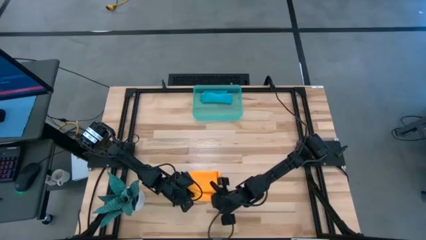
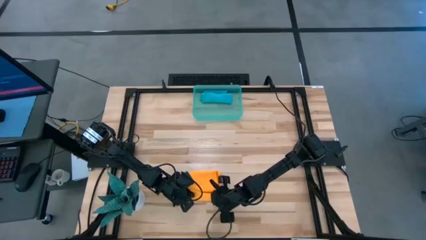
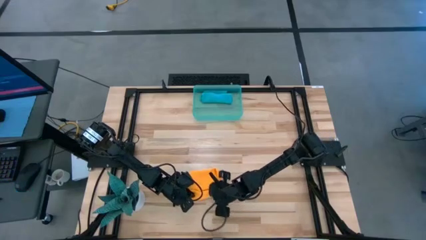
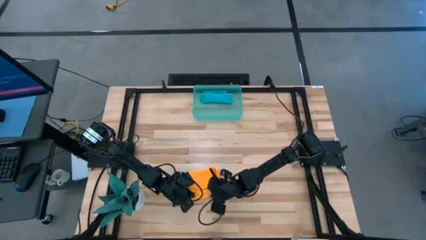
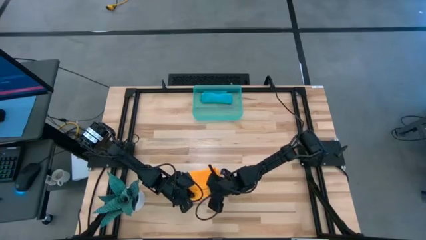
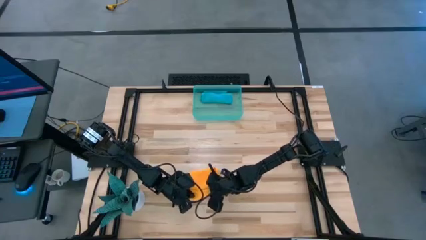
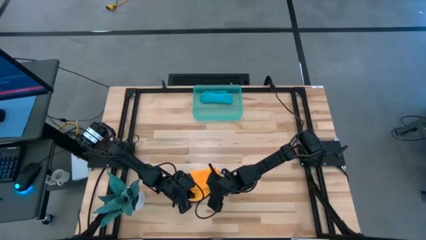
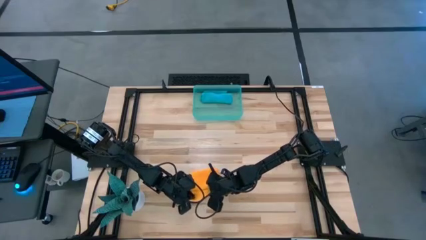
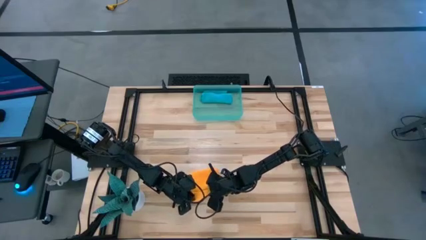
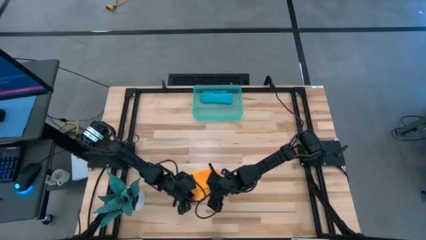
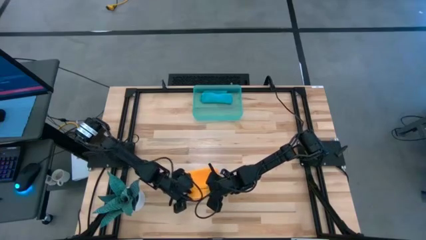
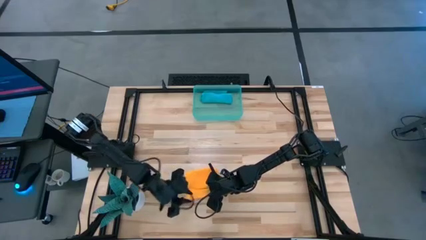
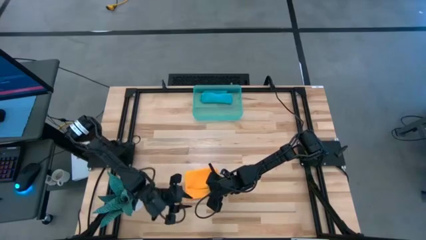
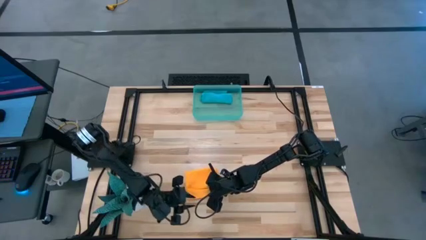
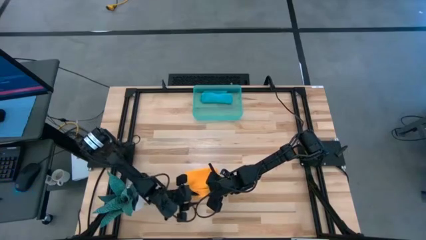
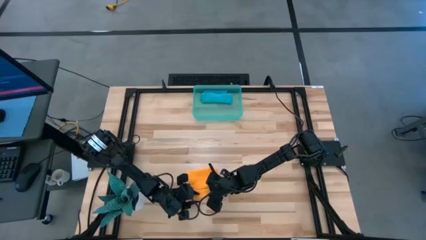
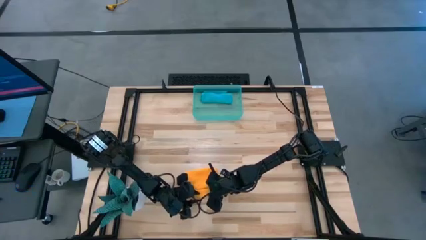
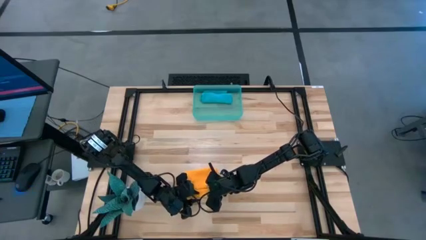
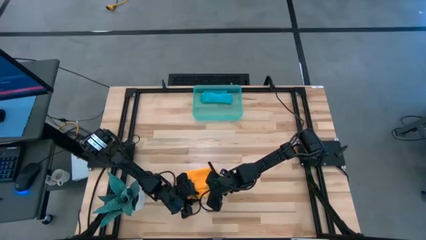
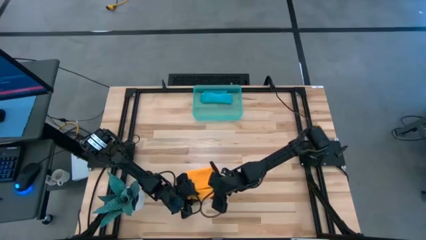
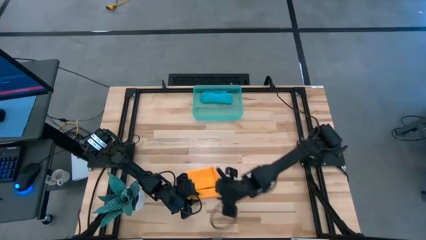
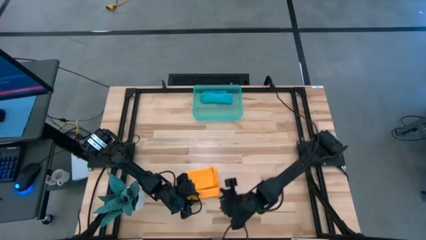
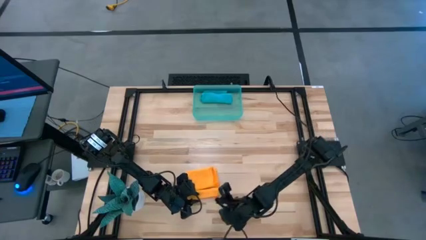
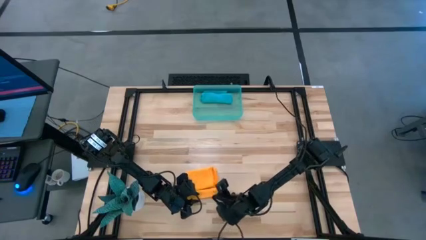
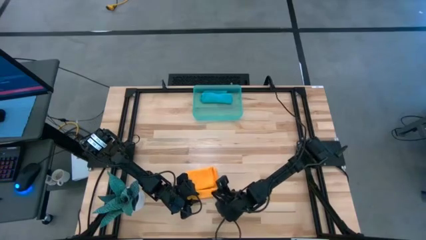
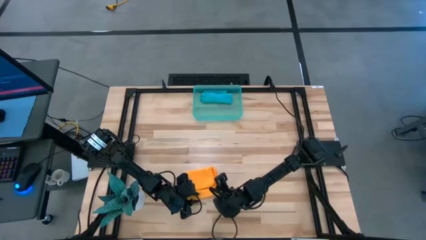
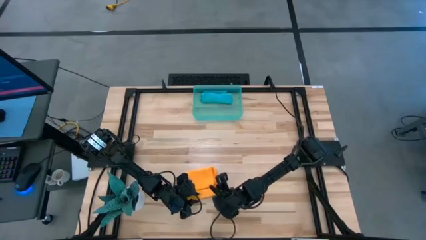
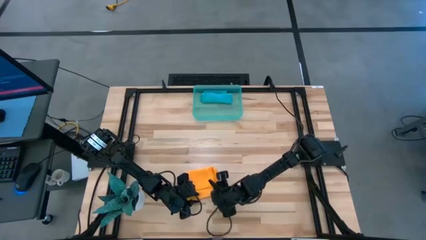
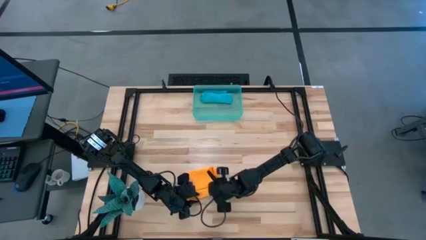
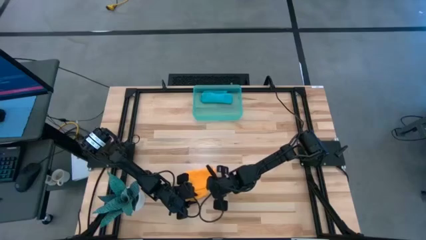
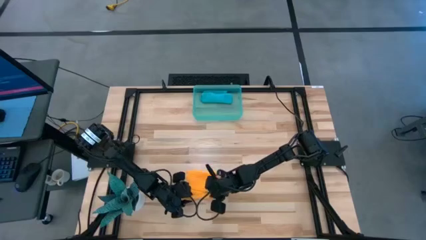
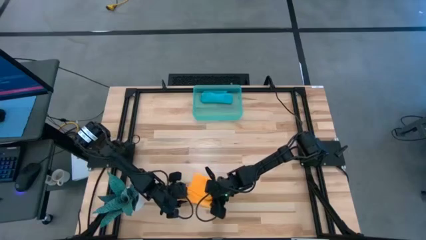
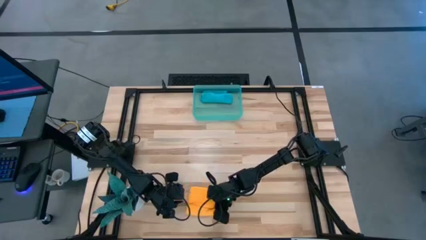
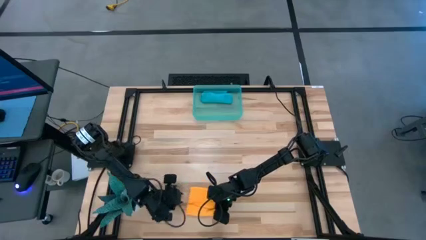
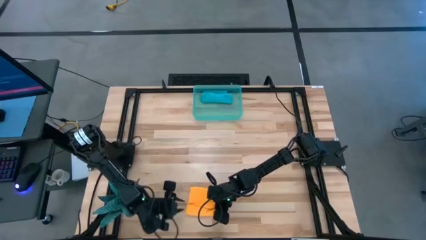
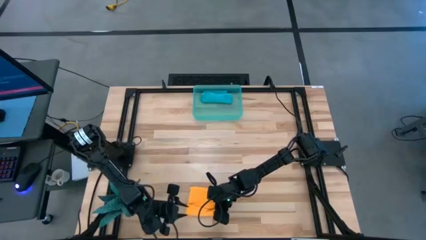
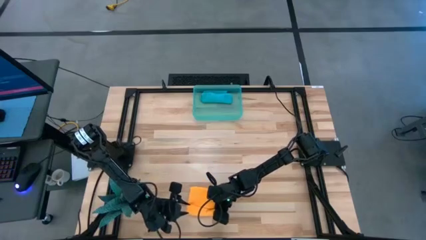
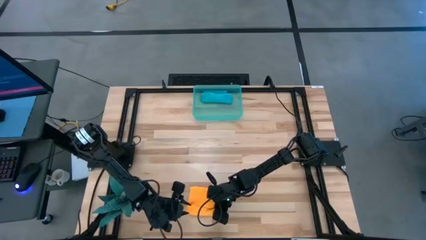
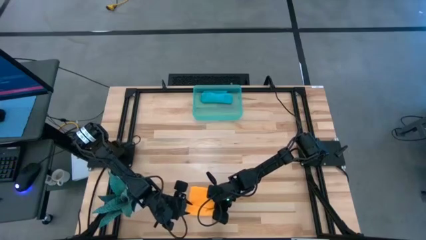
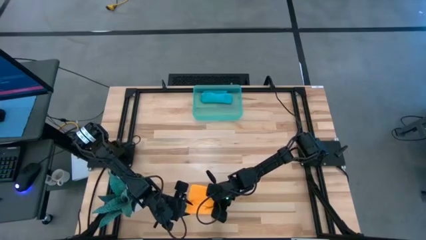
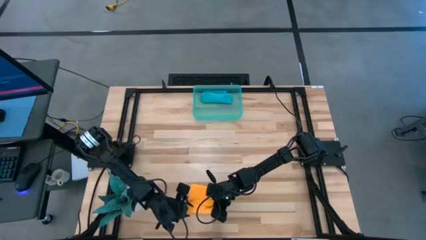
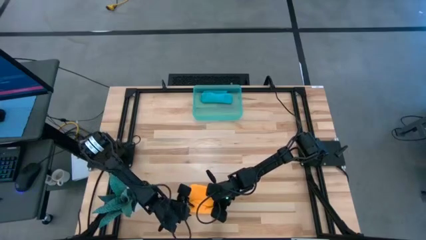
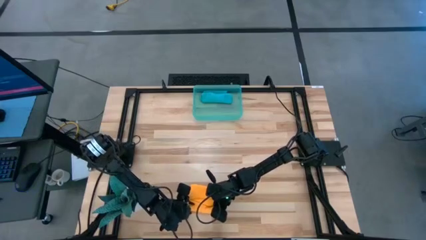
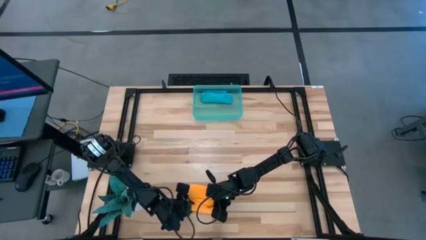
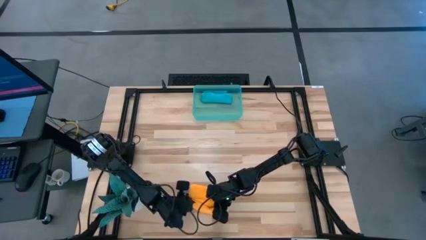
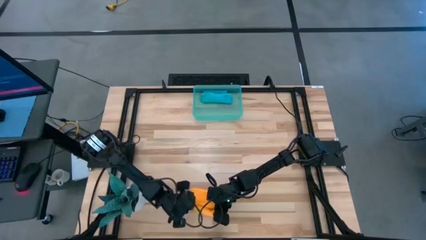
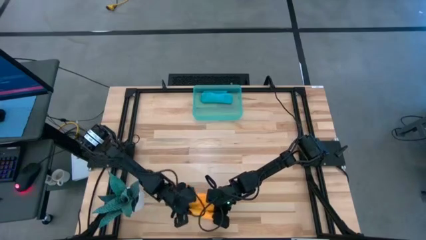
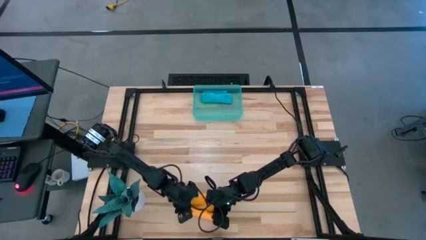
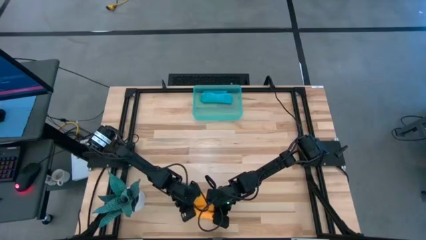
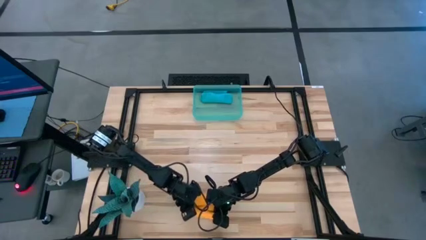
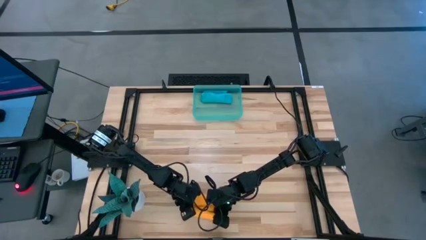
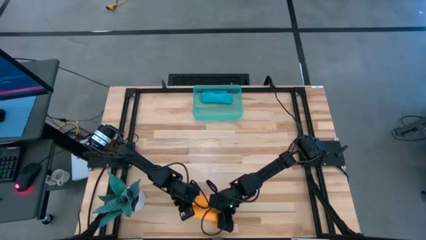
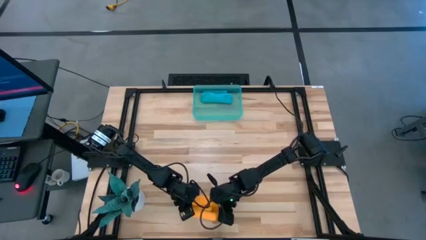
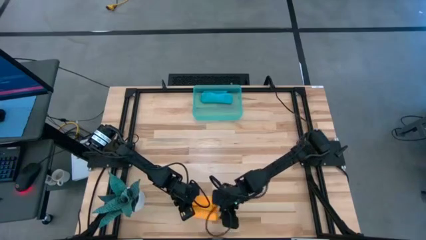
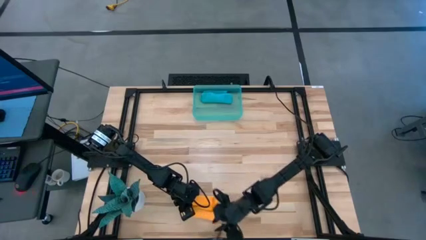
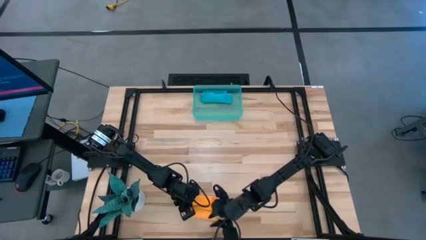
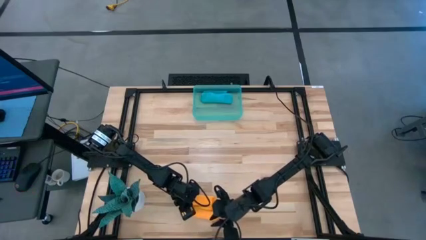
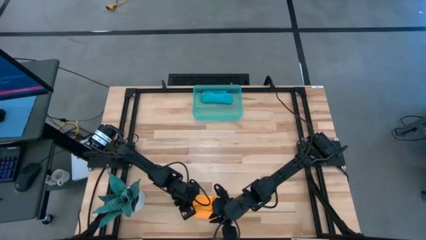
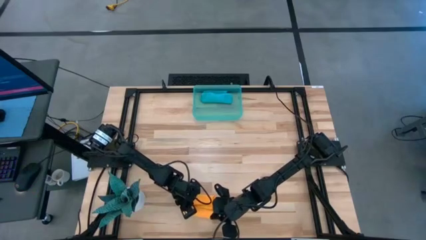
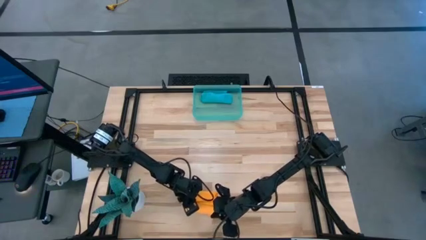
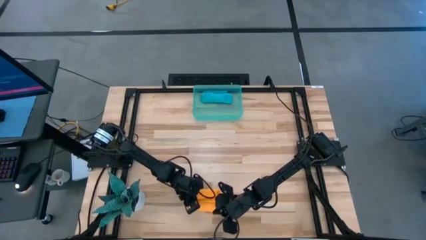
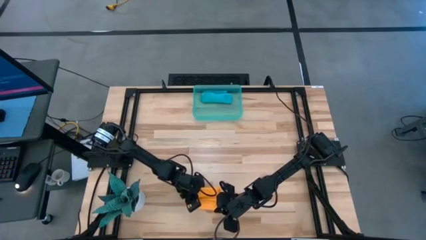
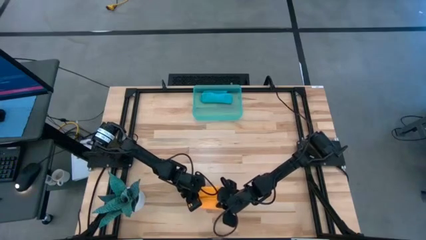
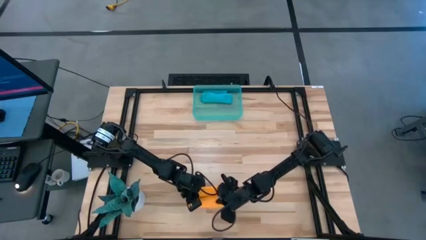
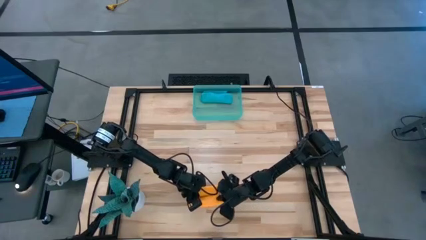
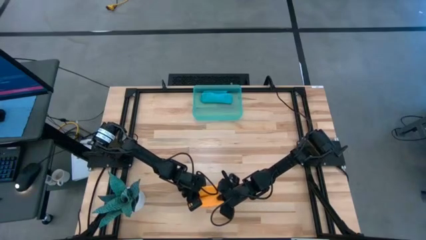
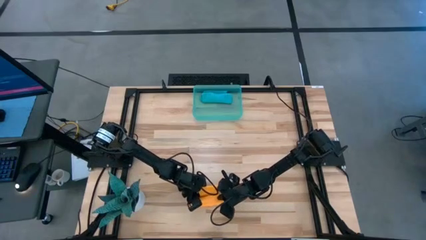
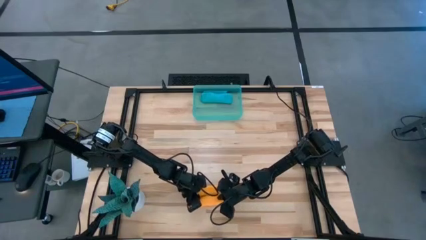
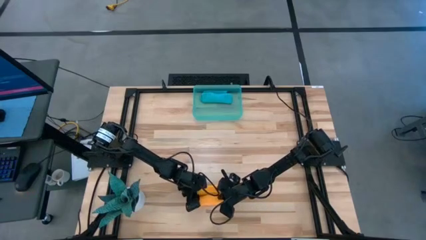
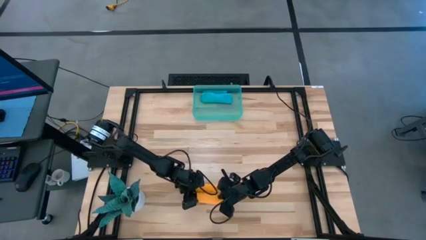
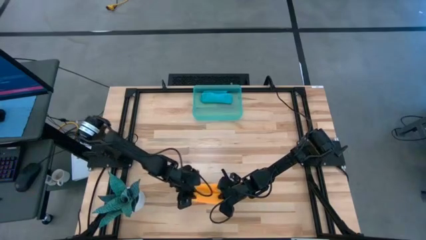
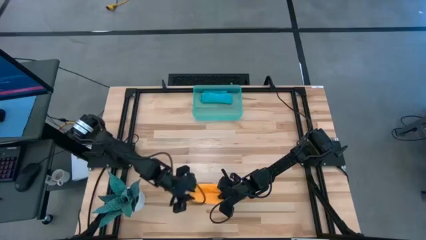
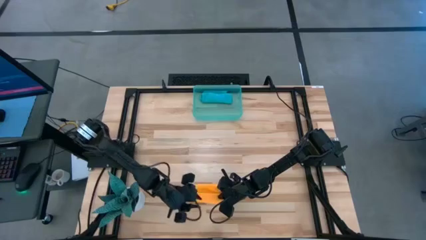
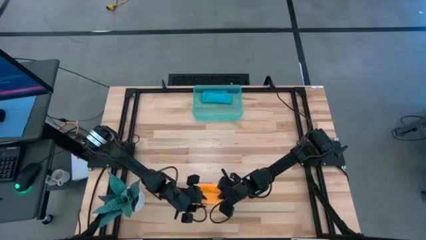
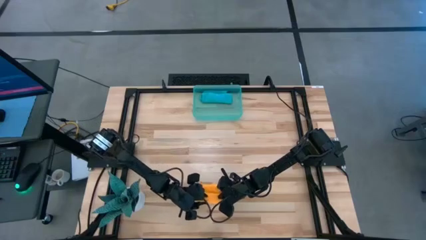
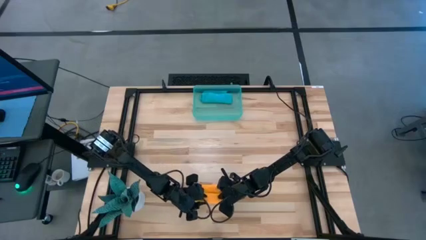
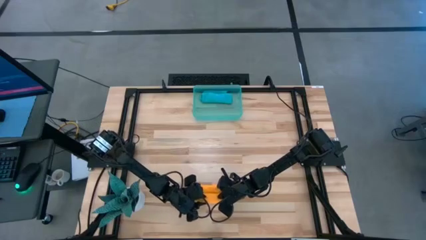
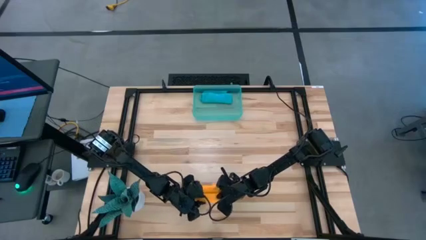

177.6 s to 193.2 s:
Task: Roll microfiber towels into tight, uniform cylinder then place into a basket
Roll the orange microfiber cloth

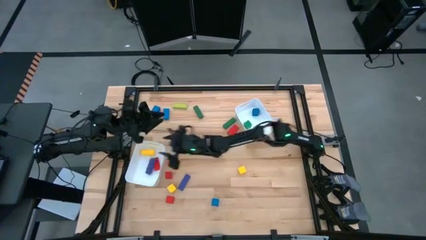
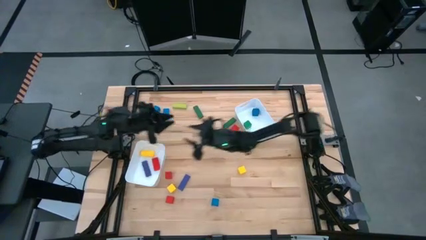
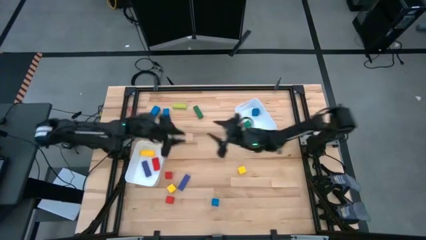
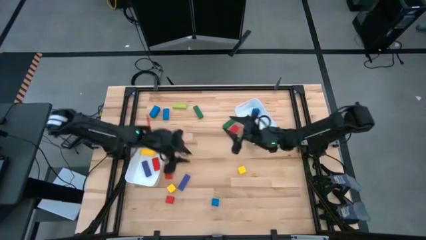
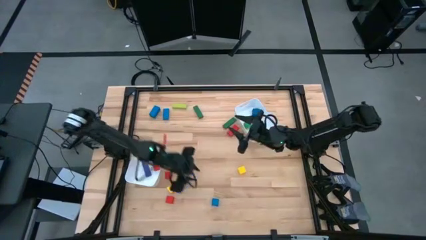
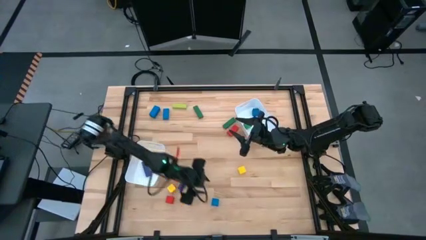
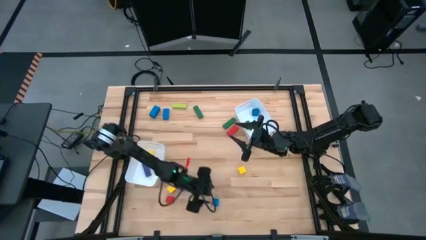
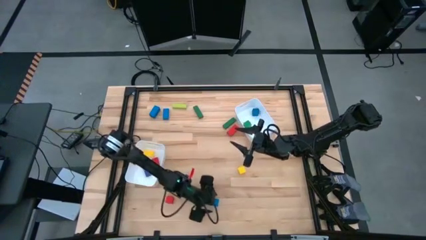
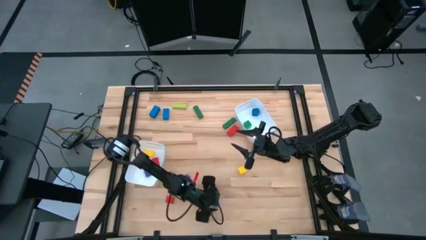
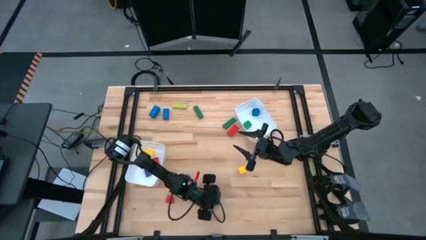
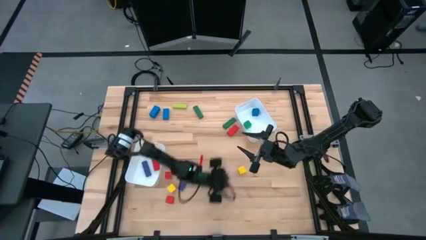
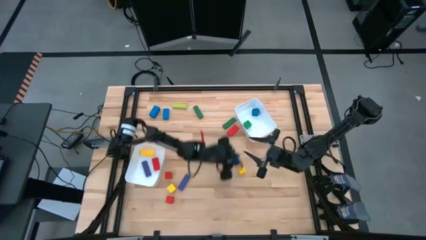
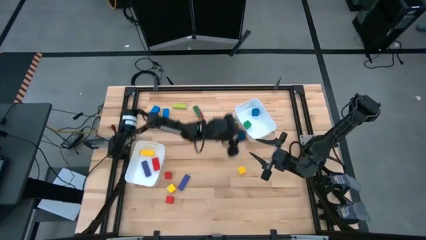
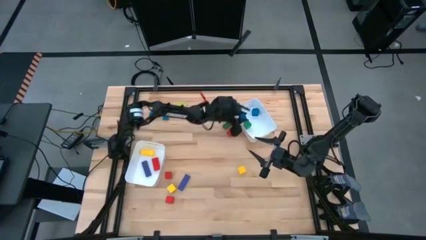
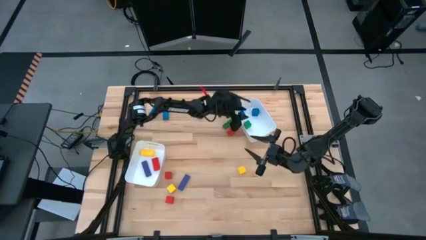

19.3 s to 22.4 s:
Task: Sort blocks by size
Put the small blue block into the right white bin
